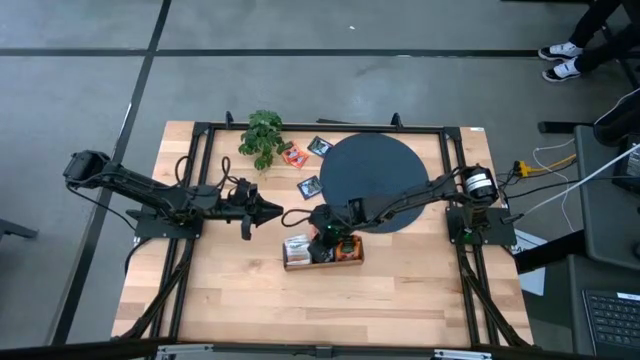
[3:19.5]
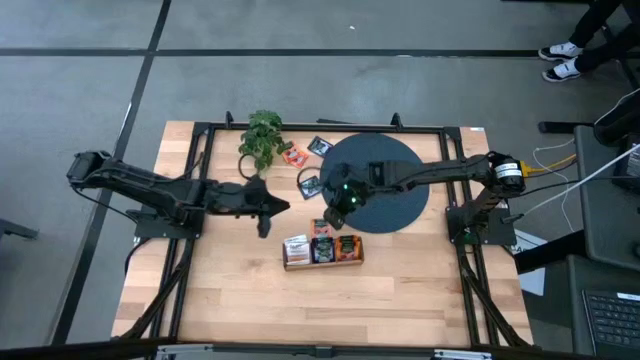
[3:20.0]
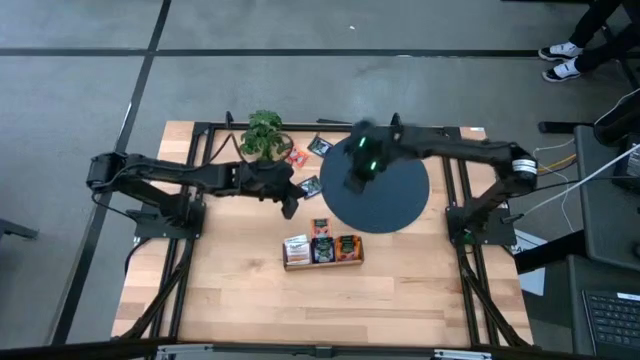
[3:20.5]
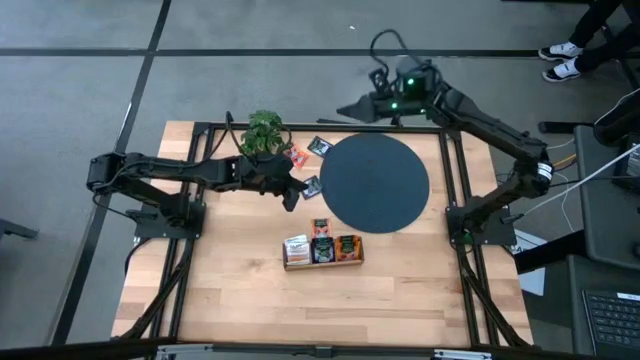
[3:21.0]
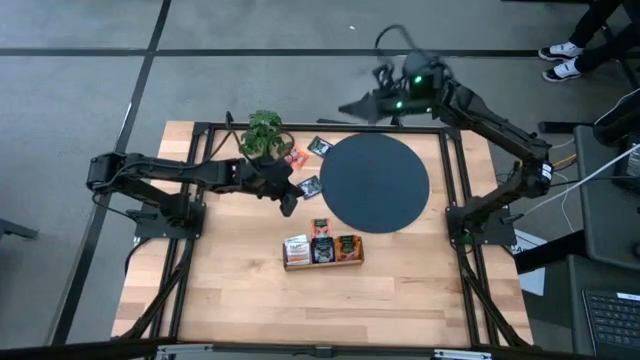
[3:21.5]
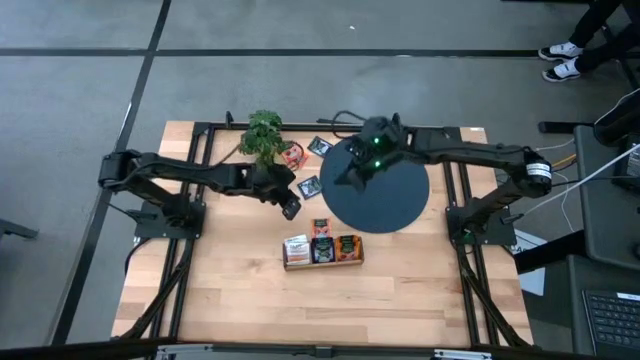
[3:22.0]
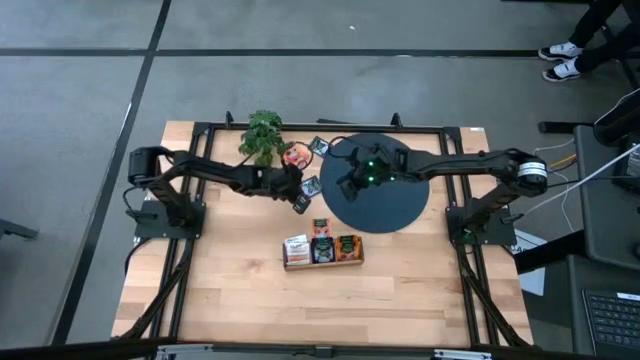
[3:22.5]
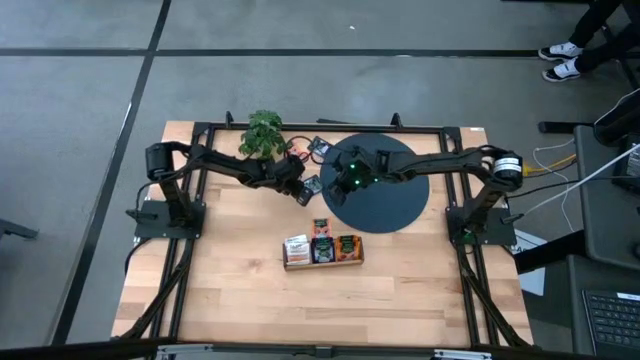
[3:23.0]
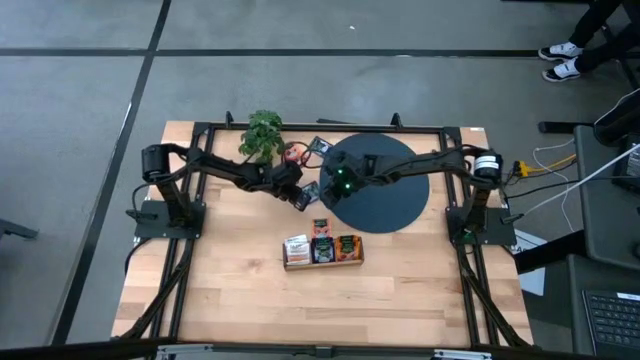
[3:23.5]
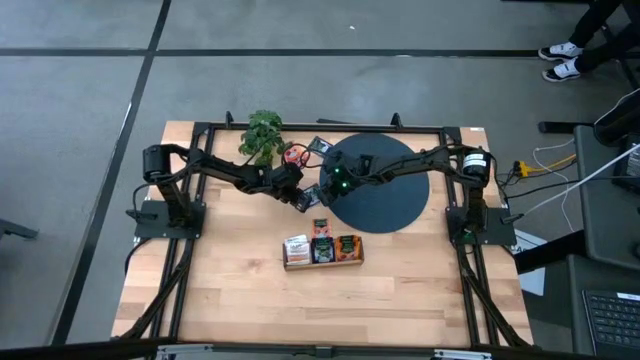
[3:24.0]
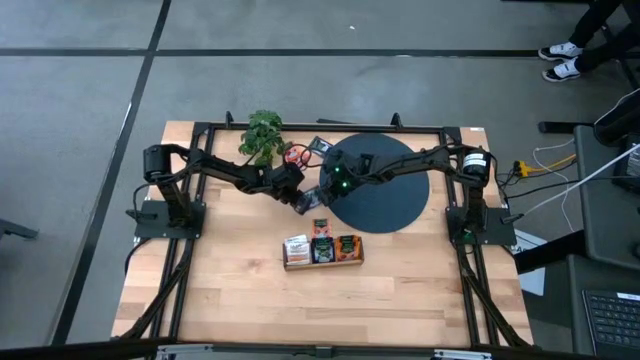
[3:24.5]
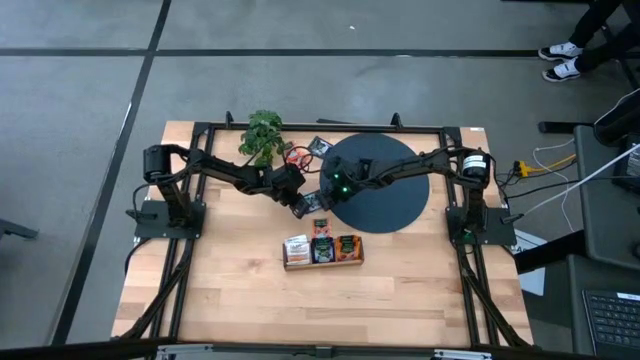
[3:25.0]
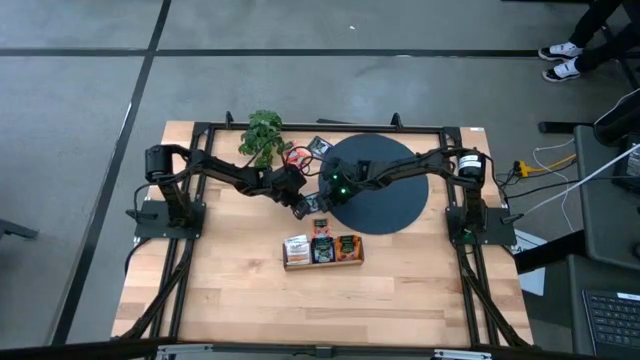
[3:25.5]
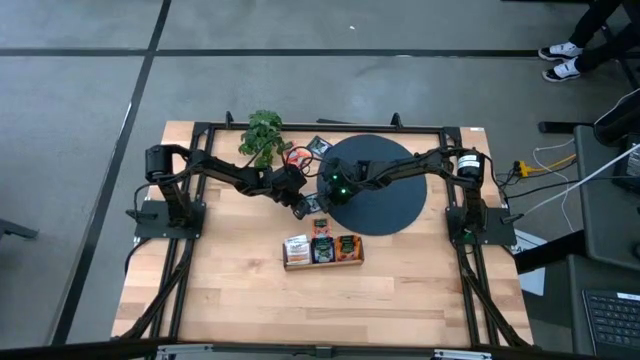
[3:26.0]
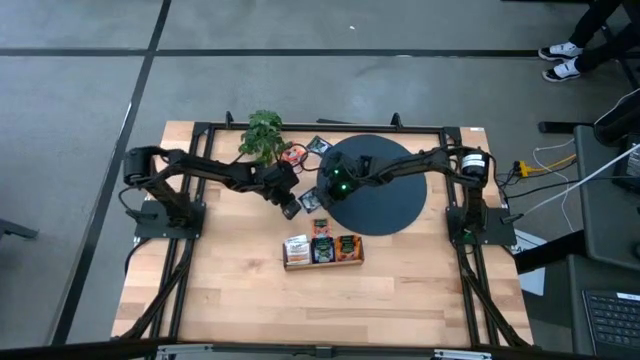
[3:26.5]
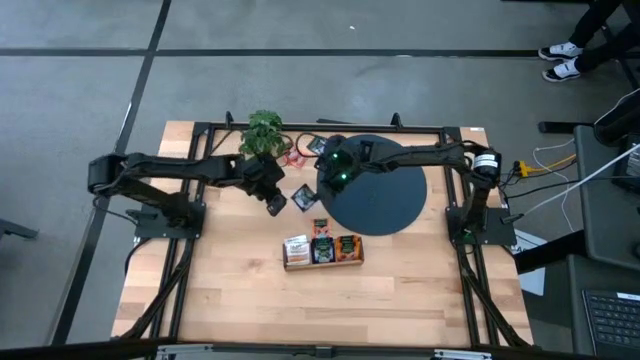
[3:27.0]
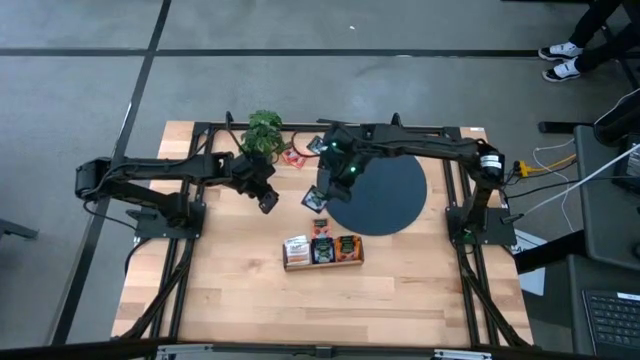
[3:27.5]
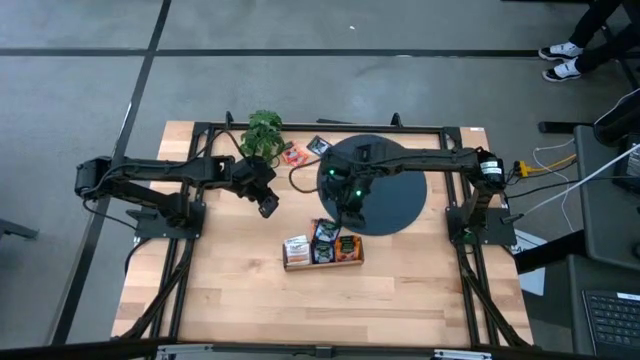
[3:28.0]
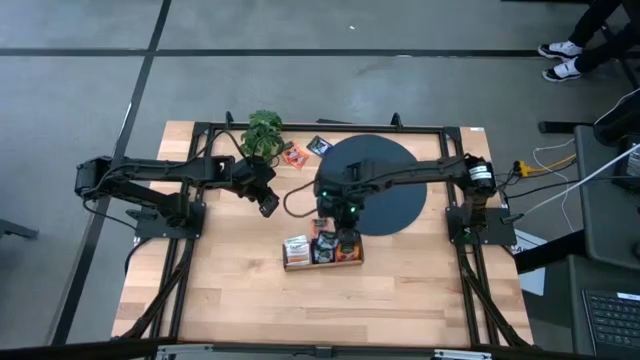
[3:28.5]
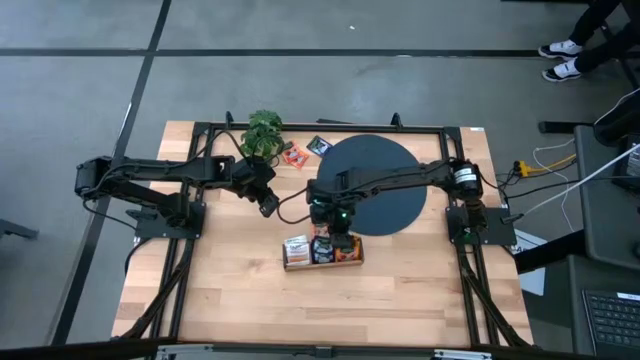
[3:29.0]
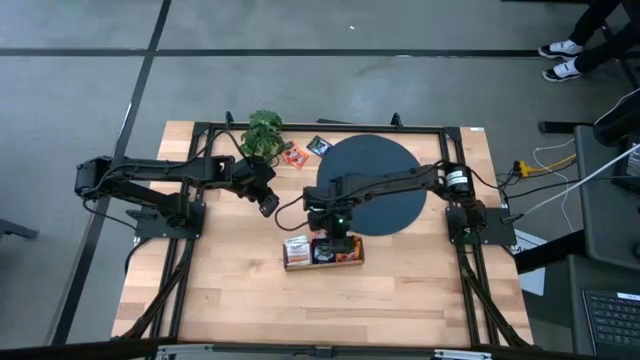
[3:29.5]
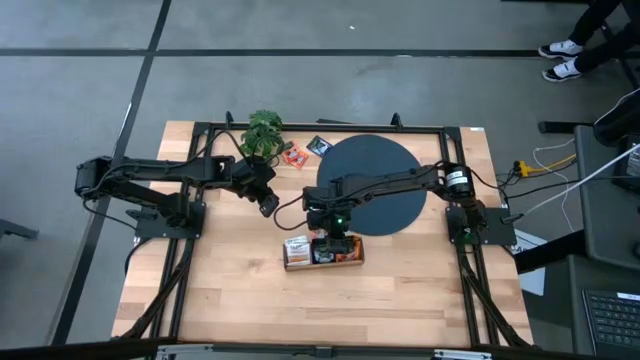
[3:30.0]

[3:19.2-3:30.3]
Task: Pick & Place Tea
Put the bottom purple tea bag into the middle section of the wooden organizer

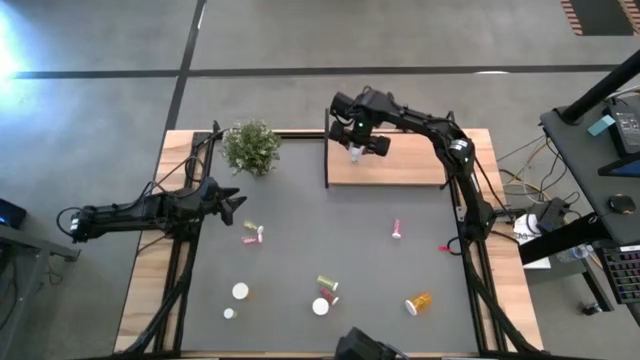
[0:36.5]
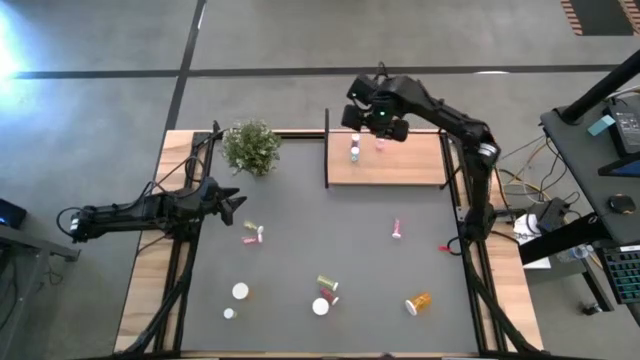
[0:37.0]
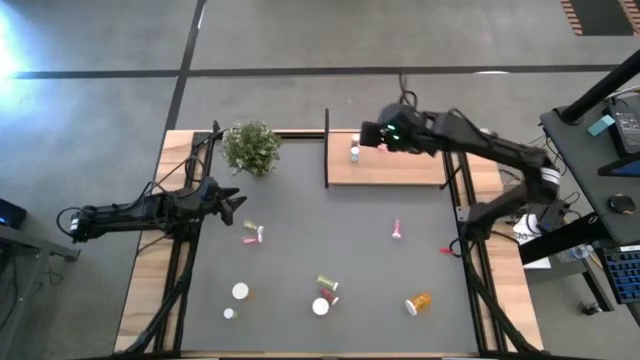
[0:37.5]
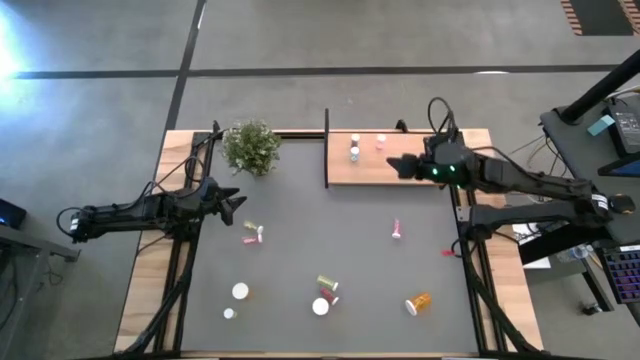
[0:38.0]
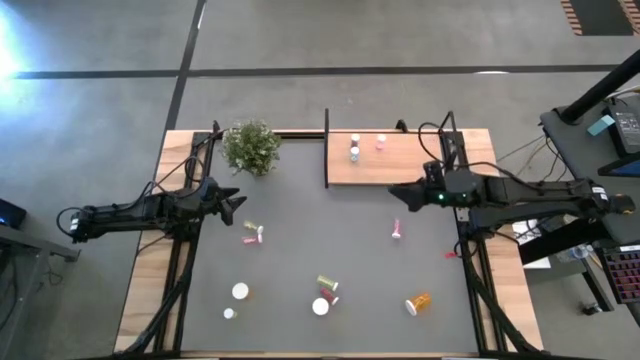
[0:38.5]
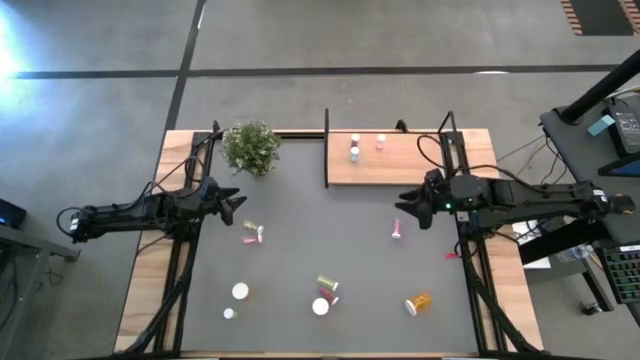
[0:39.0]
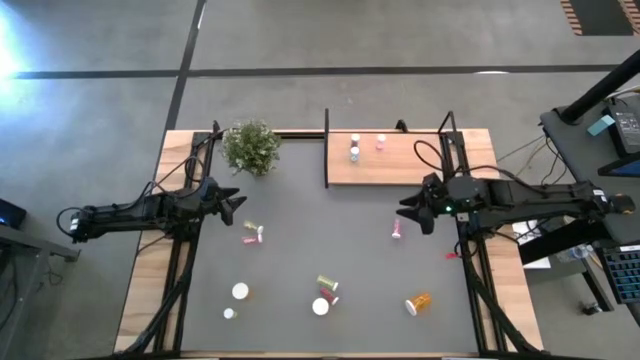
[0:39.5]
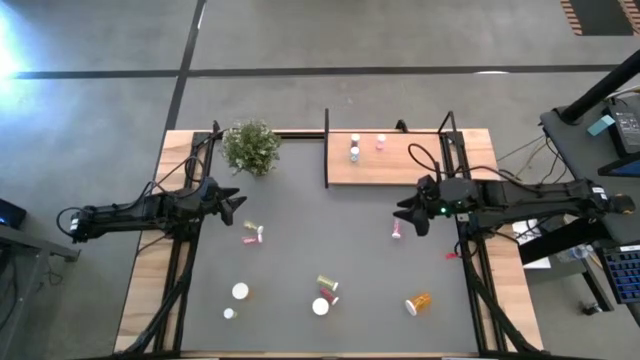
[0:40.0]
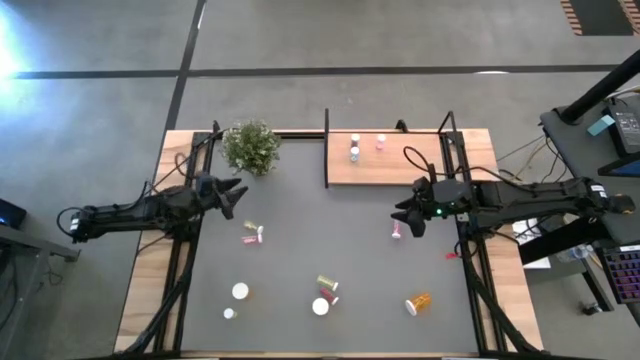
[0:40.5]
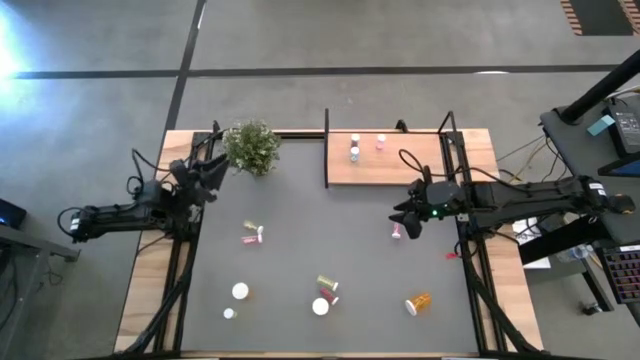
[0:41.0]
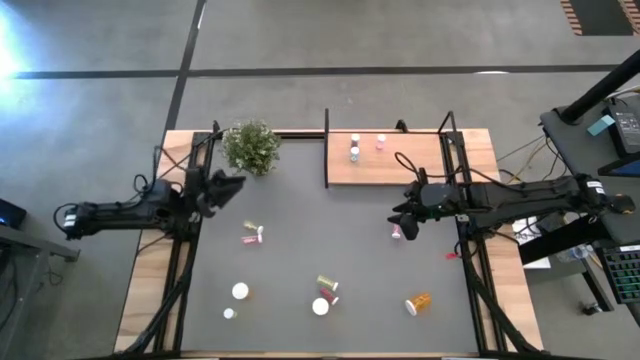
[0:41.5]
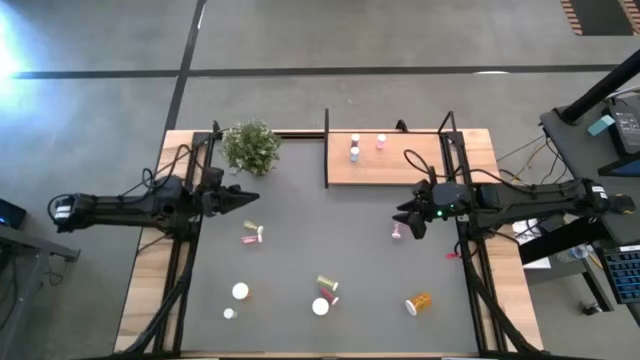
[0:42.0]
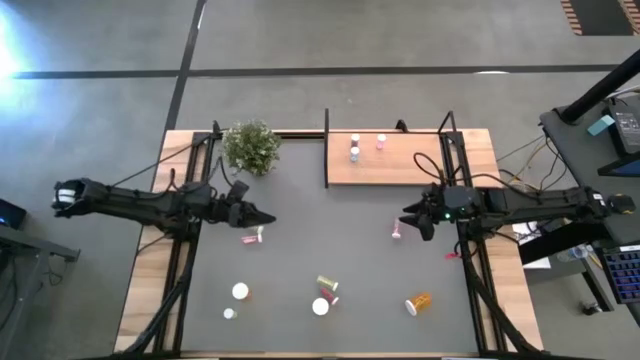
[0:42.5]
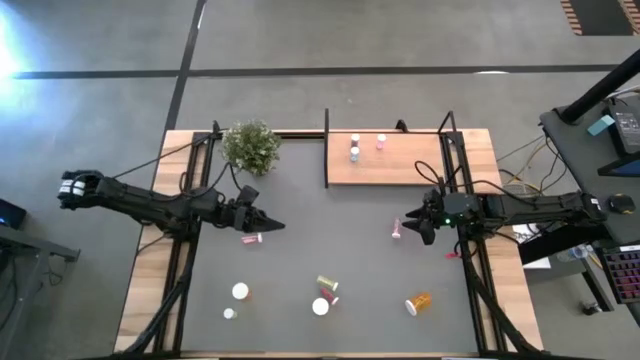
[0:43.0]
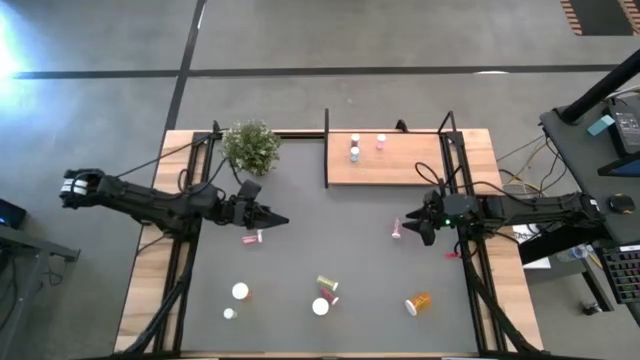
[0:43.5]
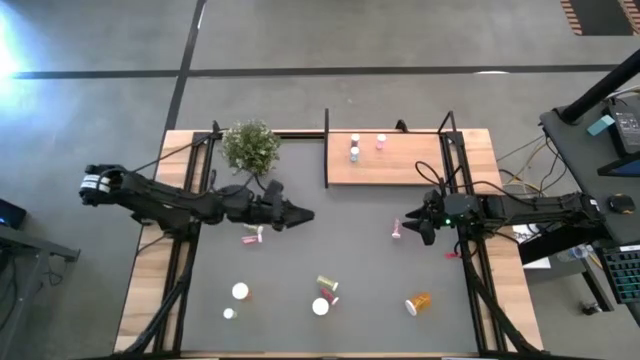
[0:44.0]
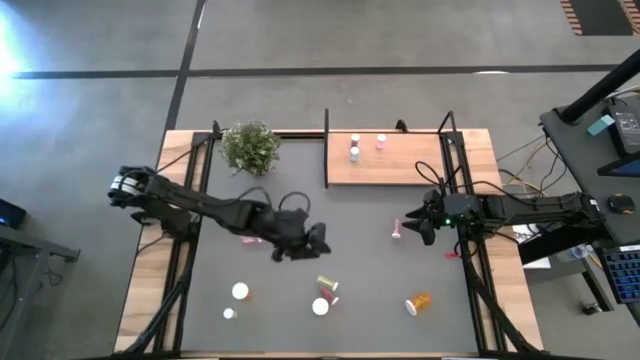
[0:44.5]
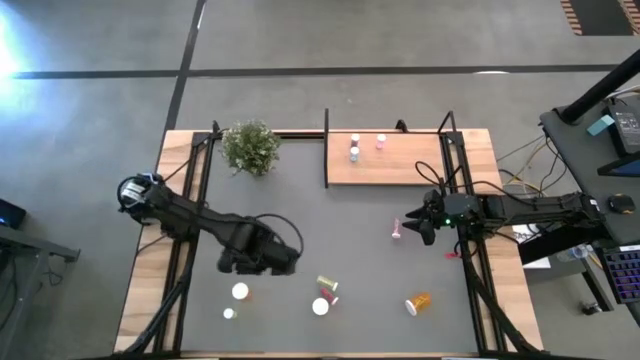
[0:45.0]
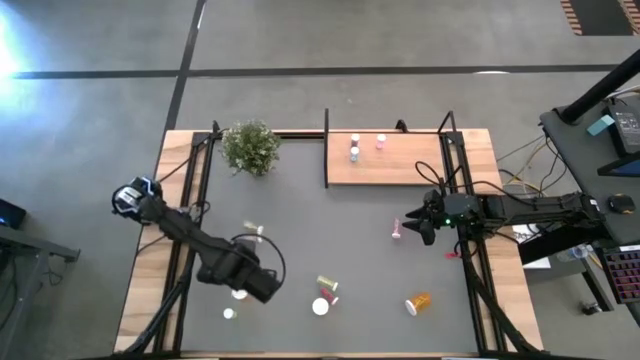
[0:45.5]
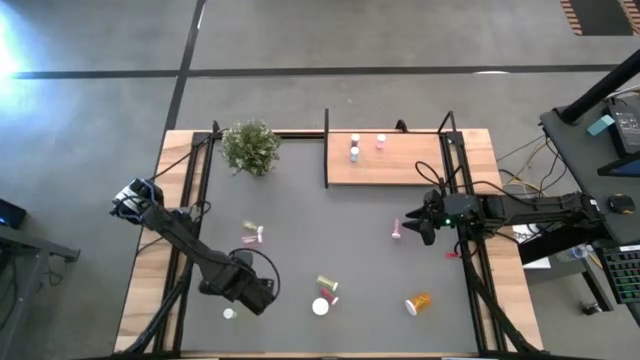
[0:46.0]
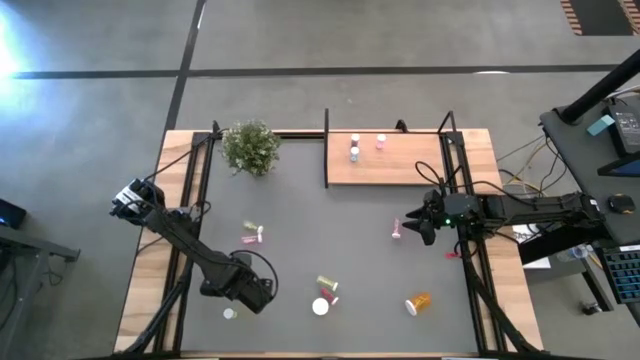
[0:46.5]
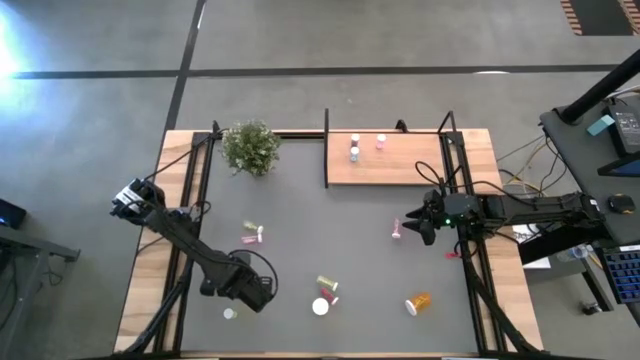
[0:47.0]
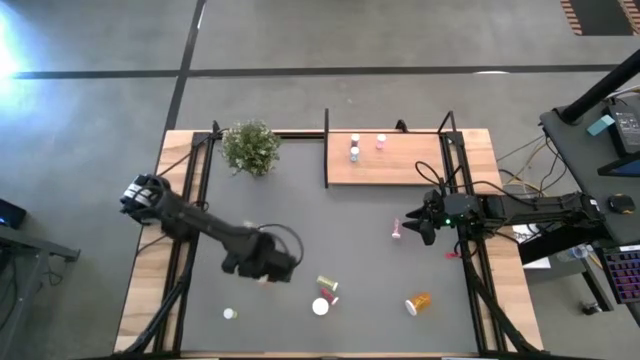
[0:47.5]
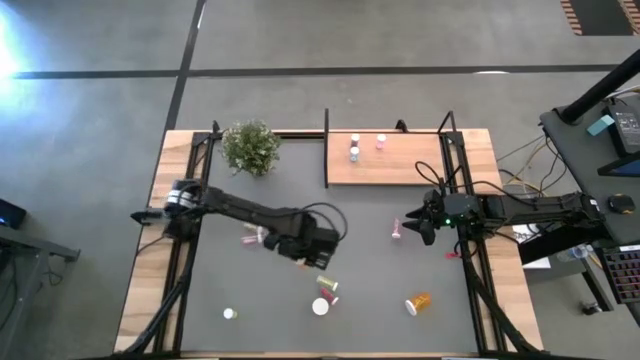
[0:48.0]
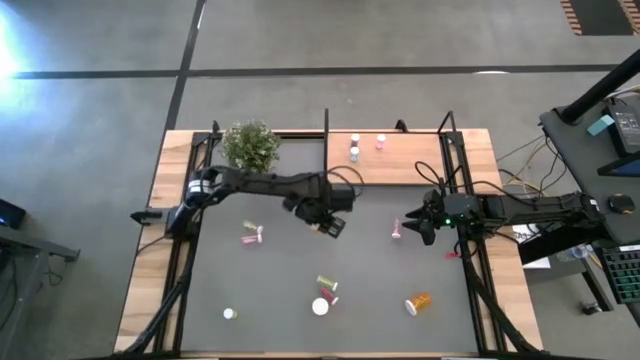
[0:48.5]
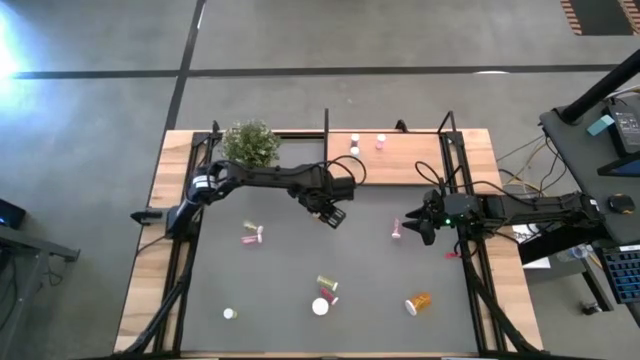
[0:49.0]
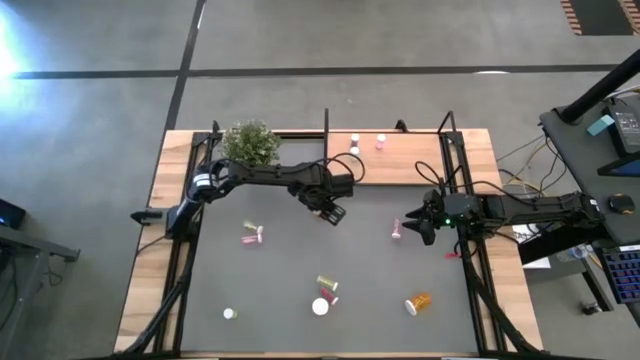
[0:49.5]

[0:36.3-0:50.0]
Task: Pick and place medicine bottles onto shelf by color
Move the left orange pill bottle to the middle
